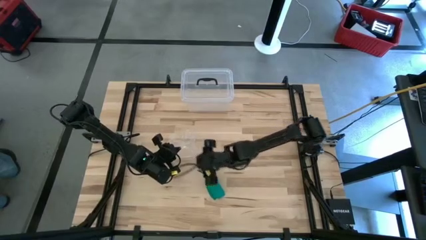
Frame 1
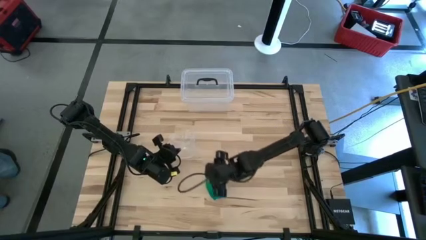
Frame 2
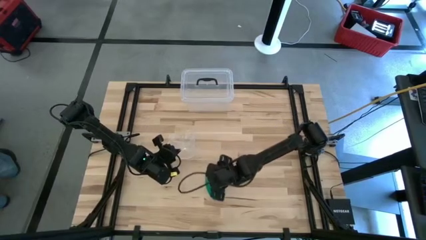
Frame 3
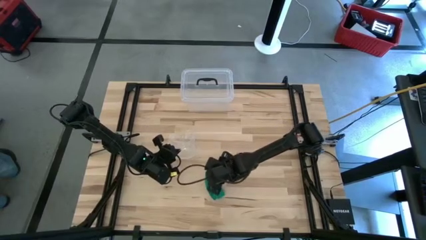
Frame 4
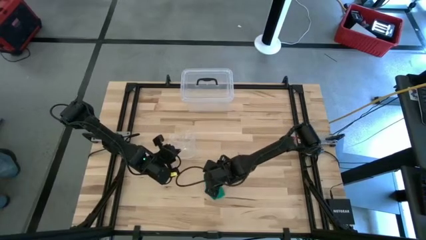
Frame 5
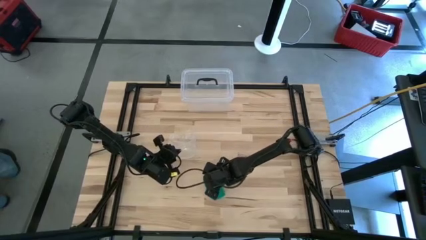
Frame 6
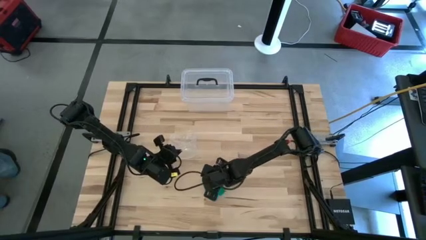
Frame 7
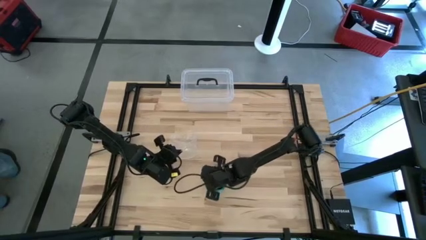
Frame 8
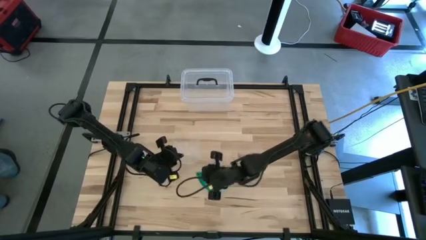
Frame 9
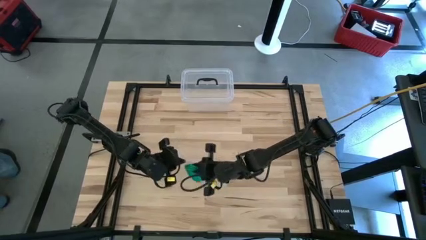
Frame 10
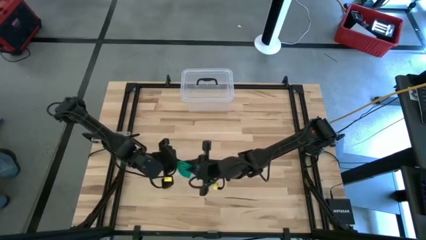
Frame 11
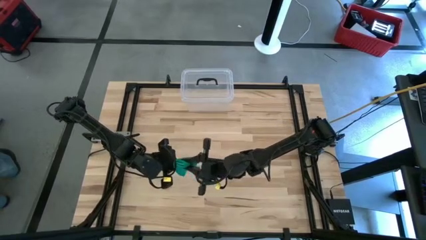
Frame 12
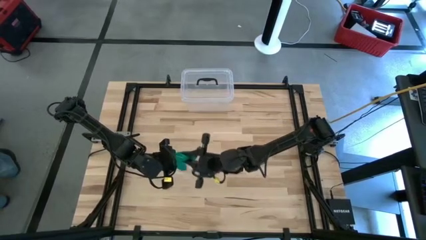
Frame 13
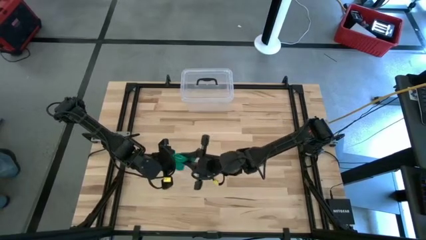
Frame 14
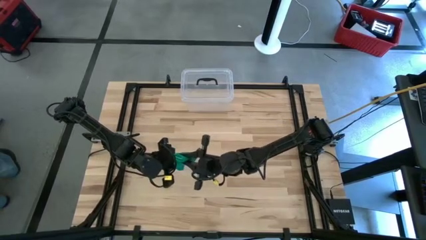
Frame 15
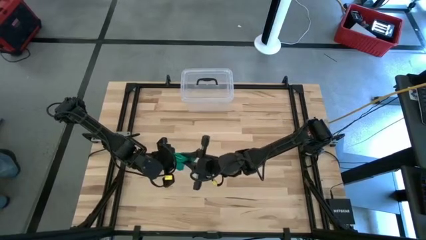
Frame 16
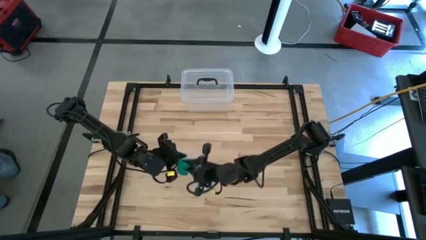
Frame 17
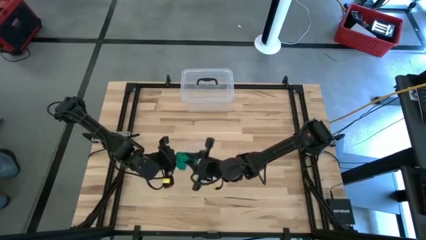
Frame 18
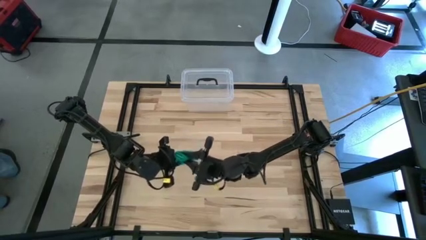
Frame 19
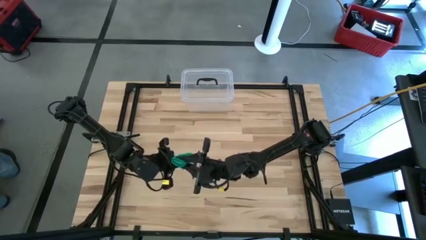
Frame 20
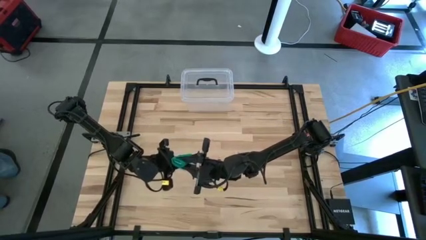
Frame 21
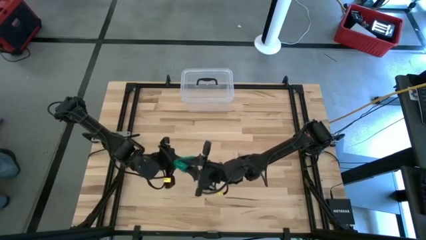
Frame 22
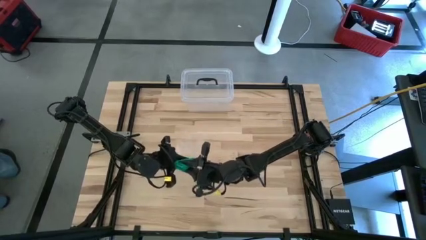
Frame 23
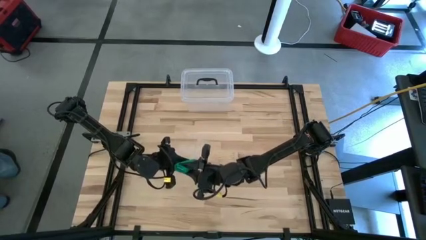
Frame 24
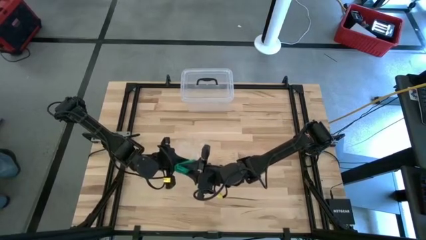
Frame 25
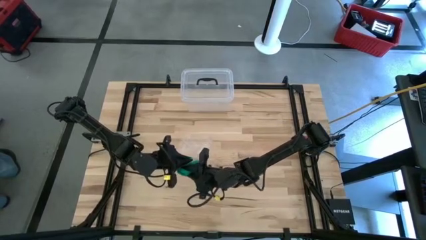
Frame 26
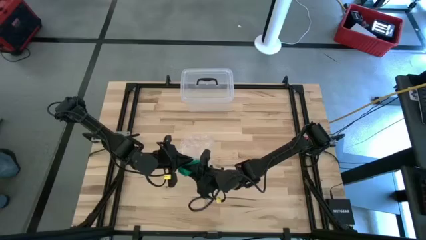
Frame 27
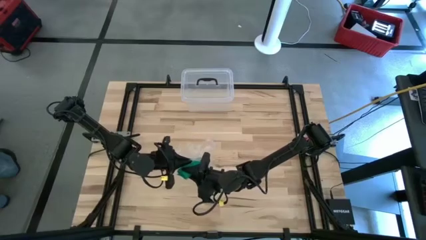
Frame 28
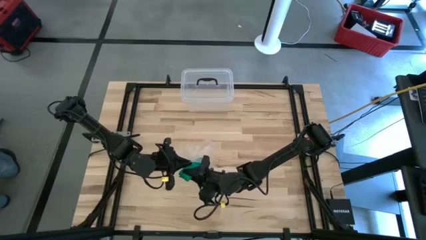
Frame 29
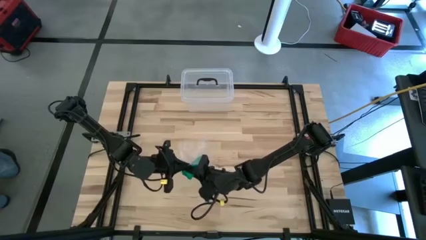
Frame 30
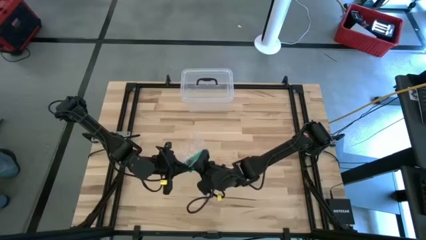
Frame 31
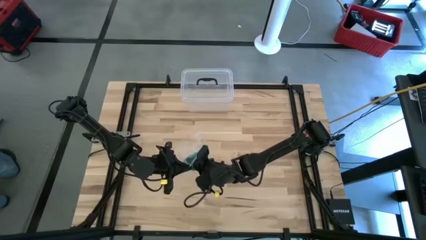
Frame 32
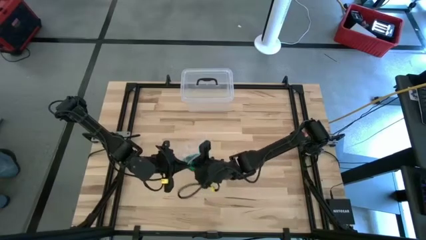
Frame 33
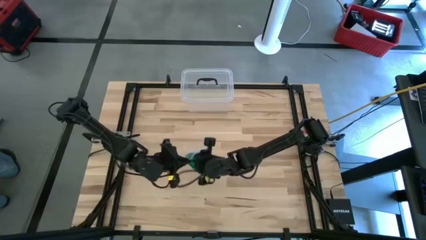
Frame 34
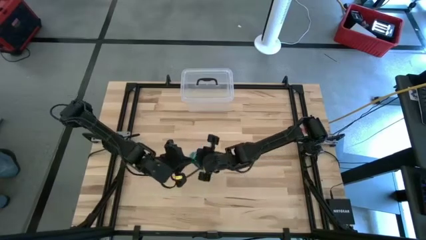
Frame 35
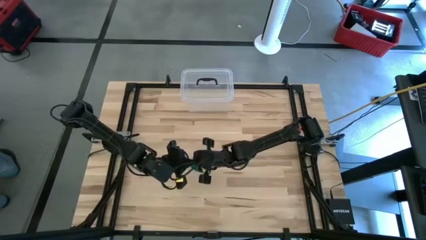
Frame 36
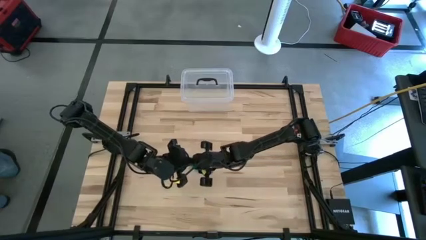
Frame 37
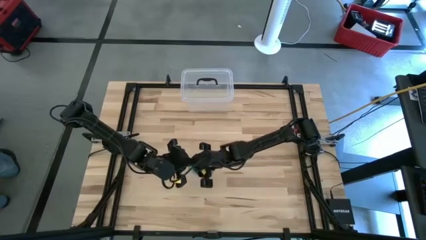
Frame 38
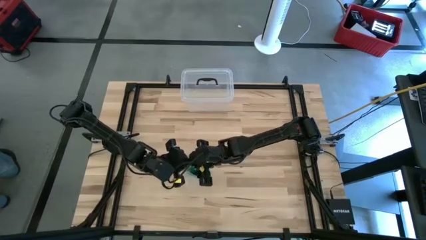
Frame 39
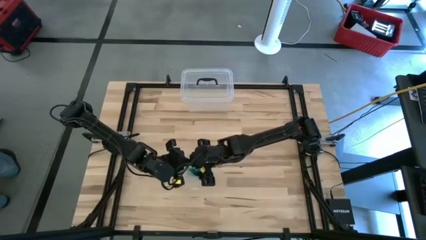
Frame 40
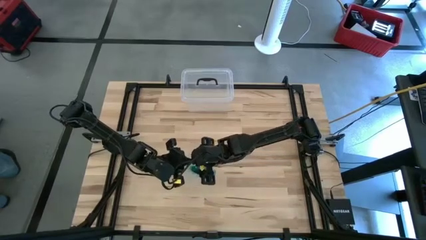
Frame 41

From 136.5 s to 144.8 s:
Task: Roll bandage
Put the rolled green bandage into the transparent zip bag

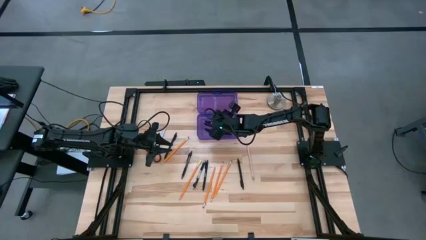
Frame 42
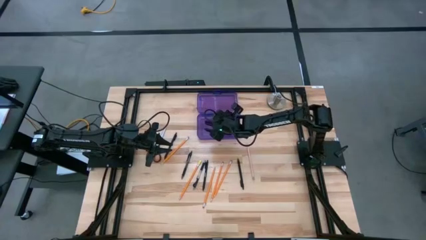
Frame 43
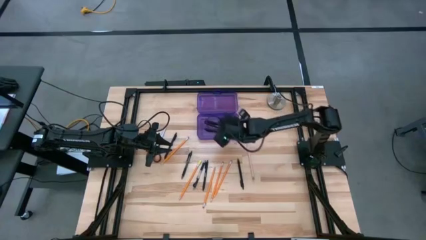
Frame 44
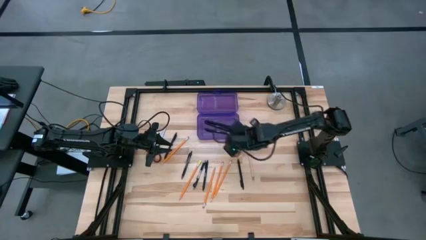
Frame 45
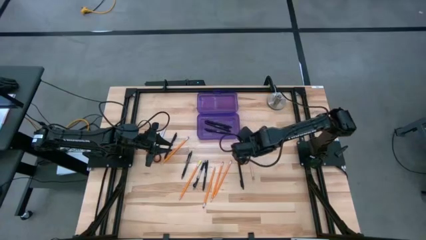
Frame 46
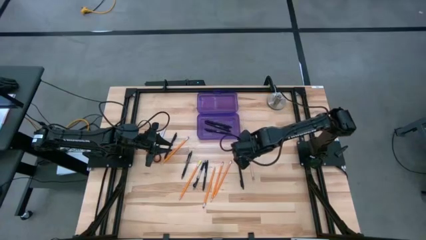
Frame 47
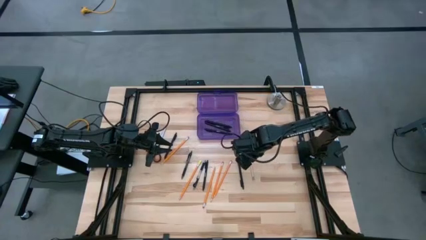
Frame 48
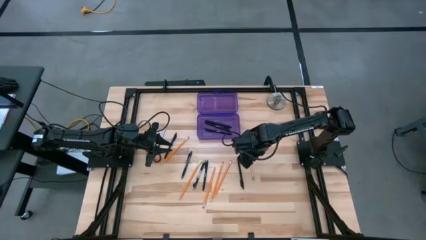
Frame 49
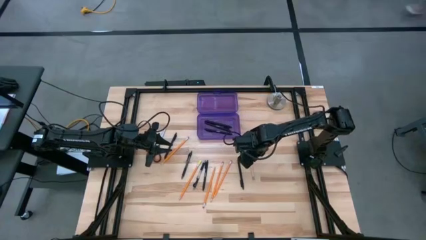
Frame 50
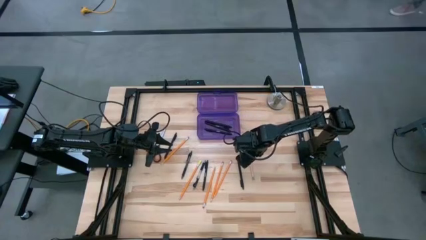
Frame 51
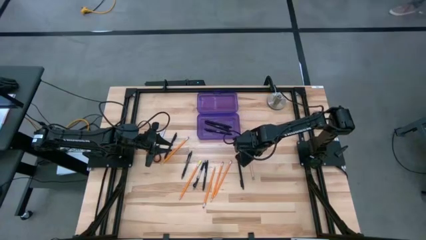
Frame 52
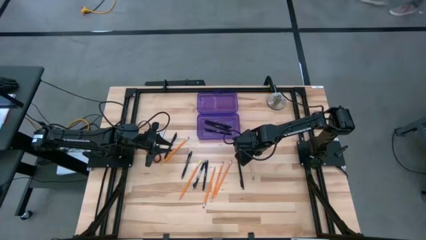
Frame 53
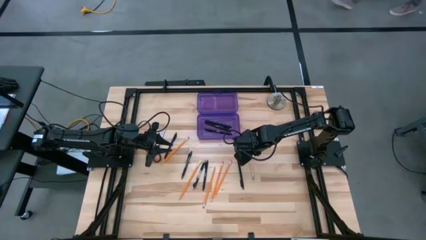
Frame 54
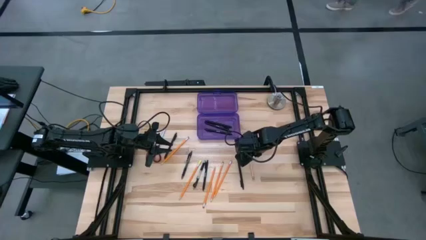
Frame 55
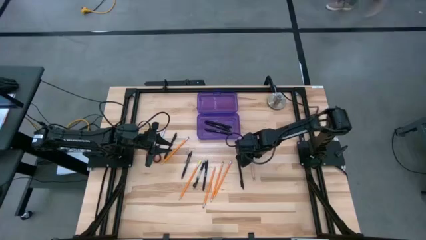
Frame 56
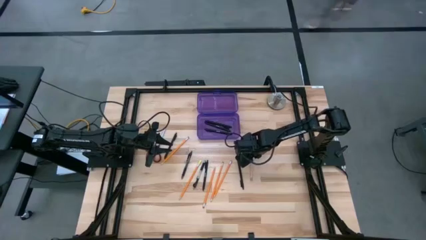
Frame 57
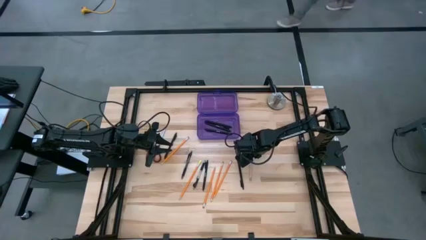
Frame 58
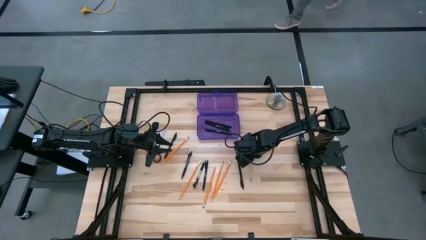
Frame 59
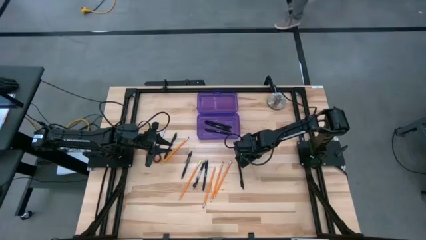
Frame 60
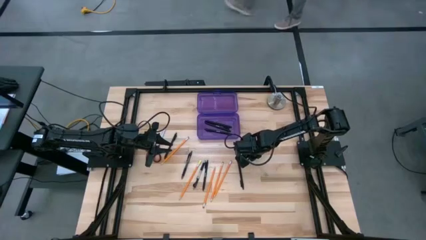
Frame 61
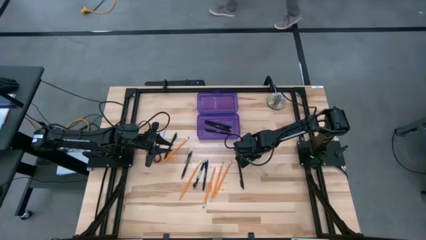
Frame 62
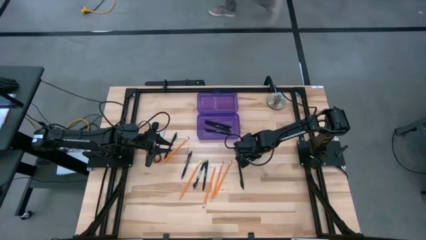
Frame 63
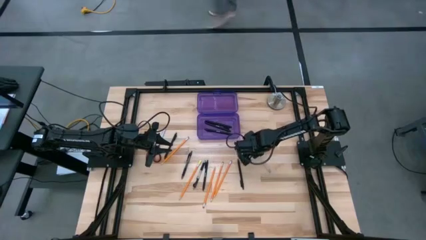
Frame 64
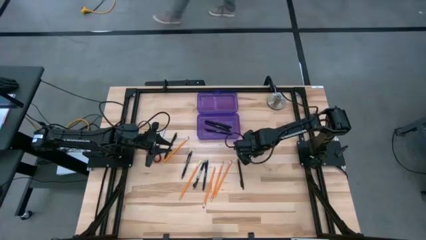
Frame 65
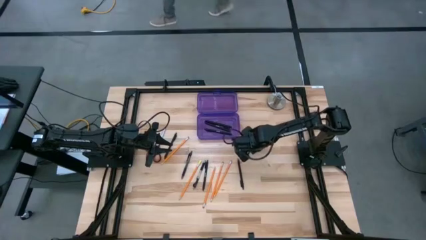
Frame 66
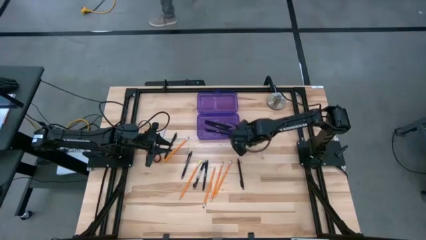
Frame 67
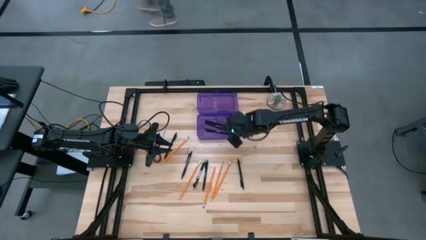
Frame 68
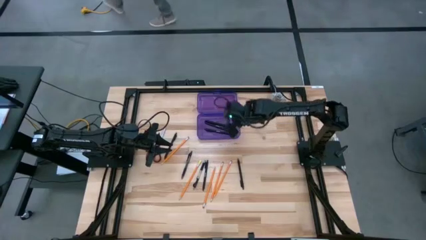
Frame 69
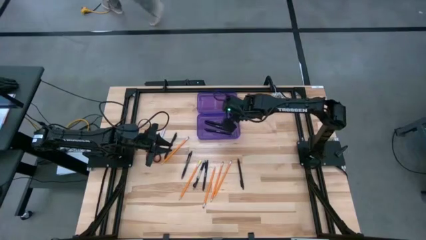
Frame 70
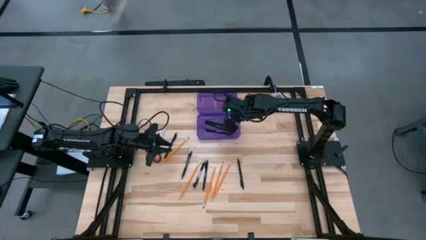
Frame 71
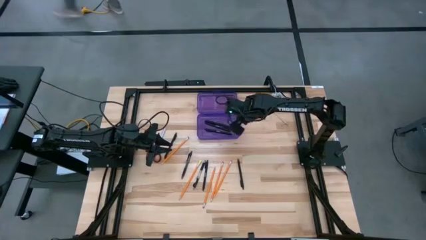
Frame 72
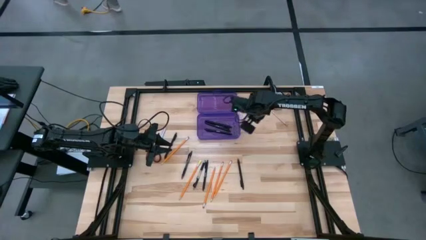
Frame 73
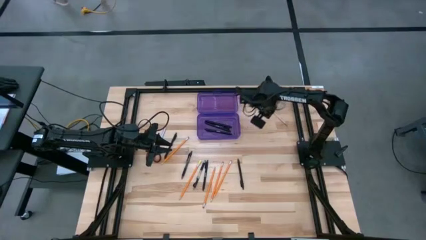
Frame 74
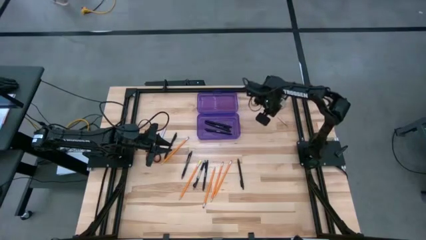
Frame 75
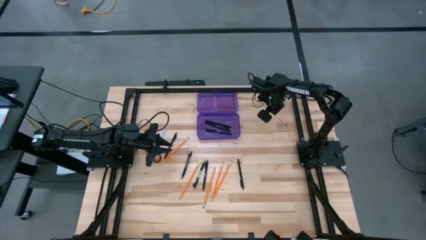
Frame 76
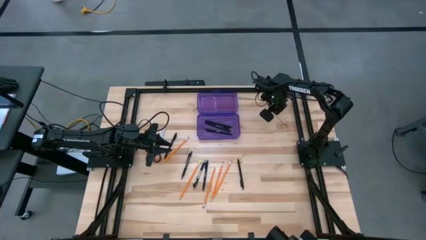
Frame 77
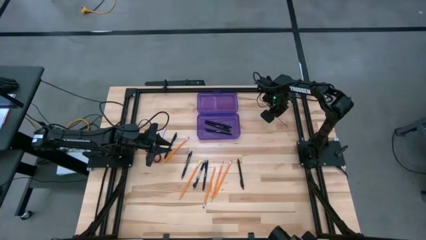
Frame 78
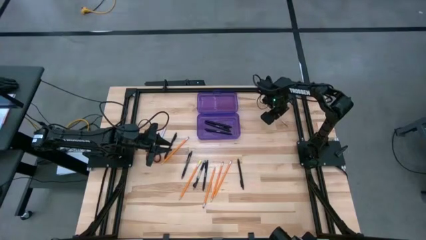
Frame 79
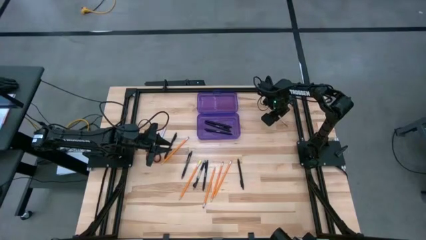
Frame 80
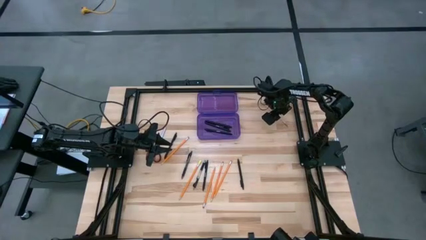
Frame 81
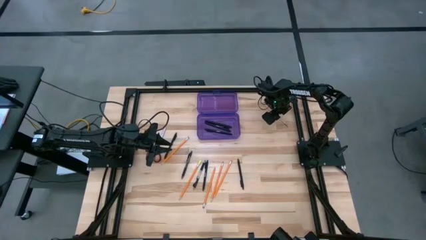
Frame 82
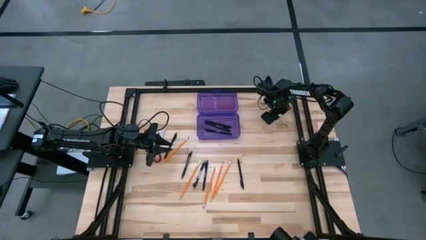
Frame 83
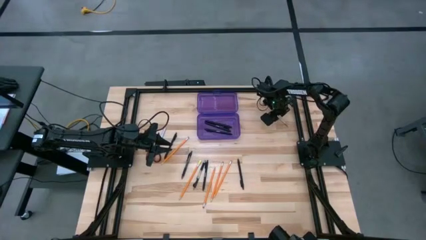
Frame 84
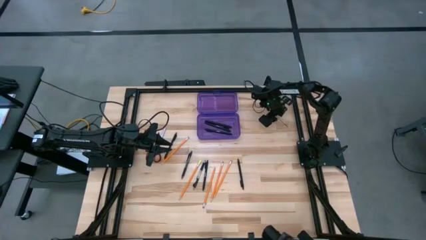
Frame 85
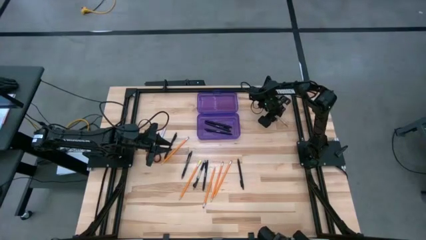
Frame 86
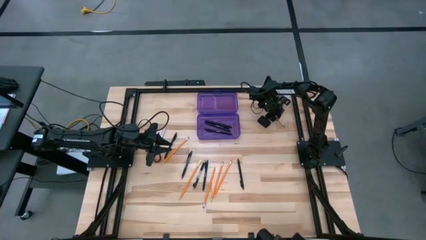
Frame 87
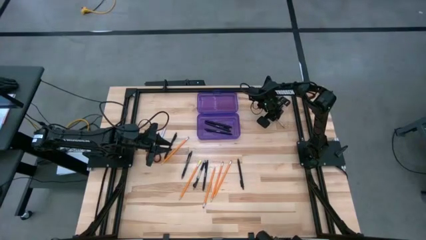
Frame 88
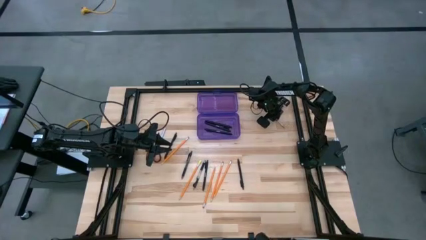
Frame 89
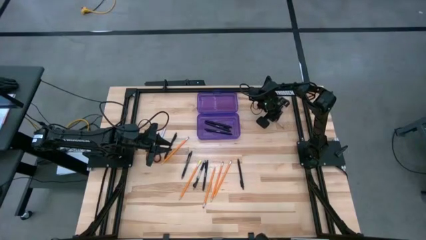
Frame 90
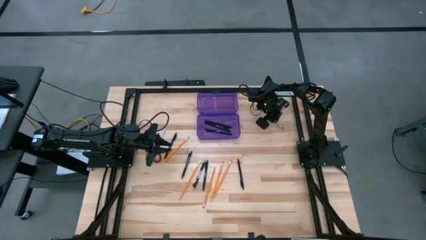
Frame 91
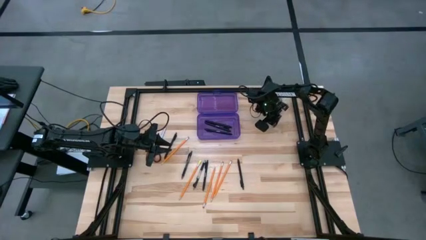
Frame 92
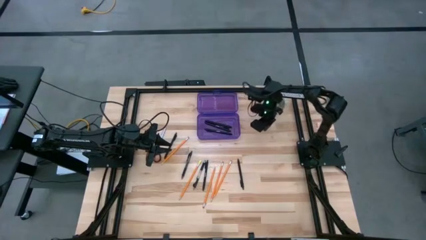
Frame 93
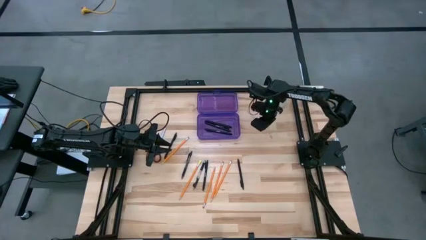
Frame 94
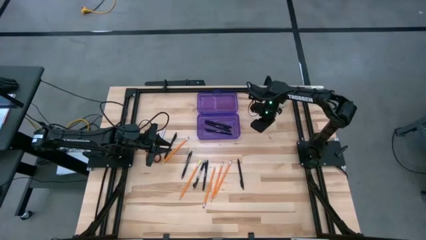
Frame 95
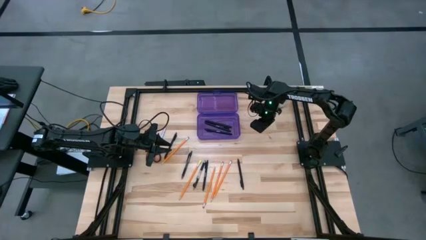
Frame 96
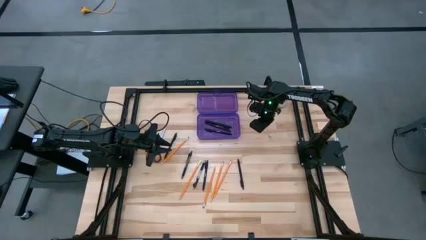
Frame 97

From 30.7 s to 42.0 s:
Task: Pick & place school supplies into a supply box
Put the light pink pencil into the purple supply box
